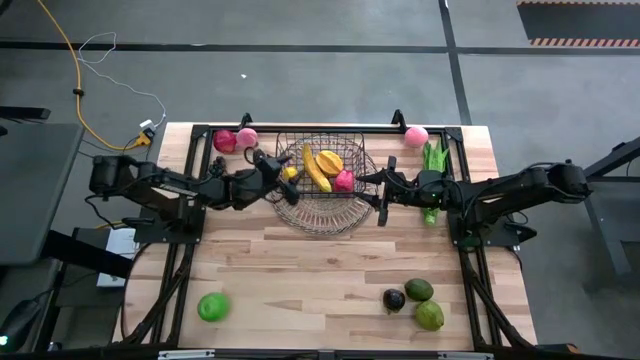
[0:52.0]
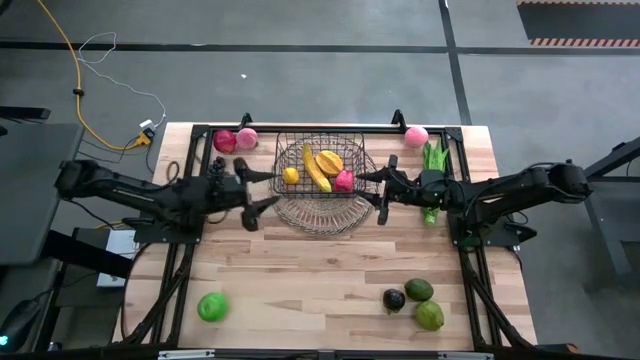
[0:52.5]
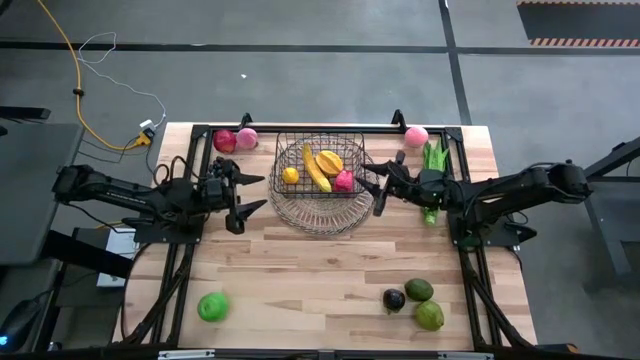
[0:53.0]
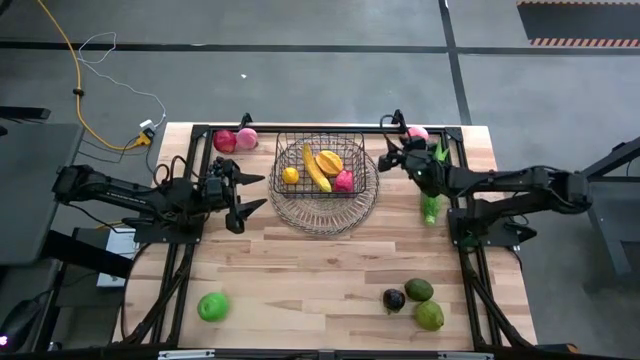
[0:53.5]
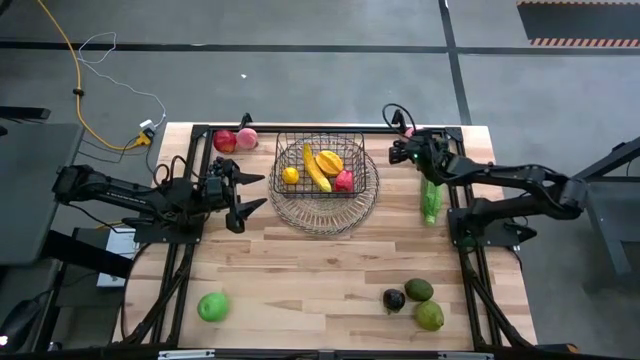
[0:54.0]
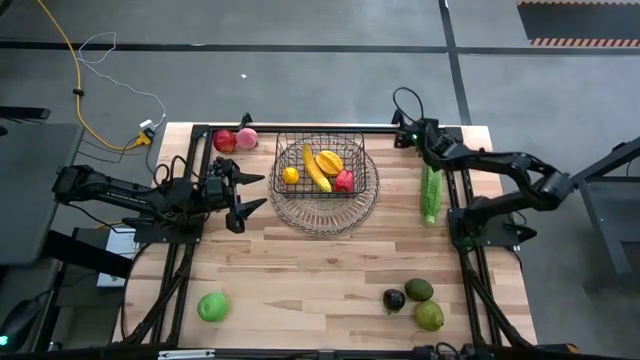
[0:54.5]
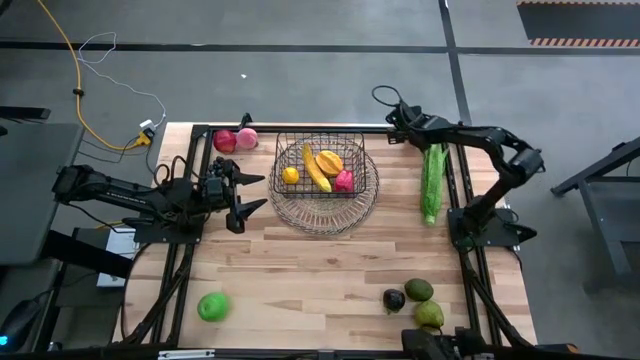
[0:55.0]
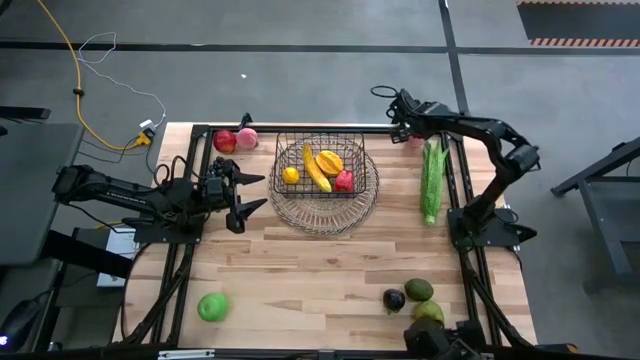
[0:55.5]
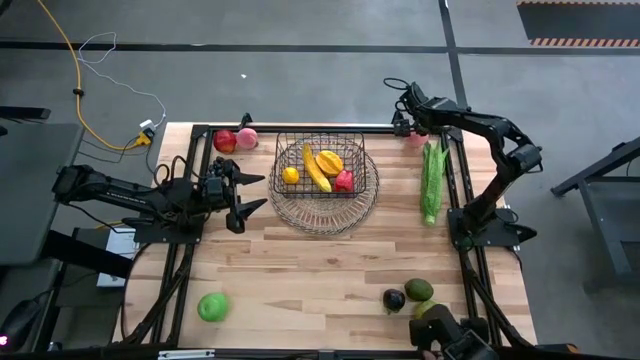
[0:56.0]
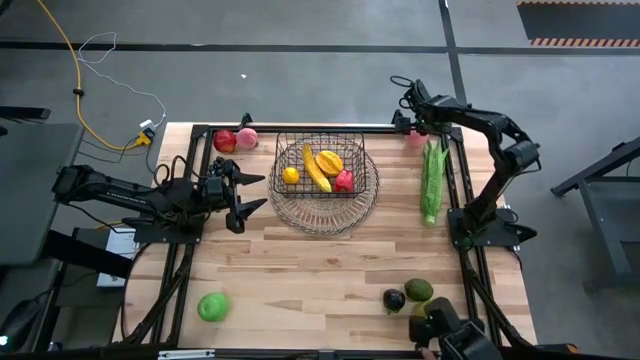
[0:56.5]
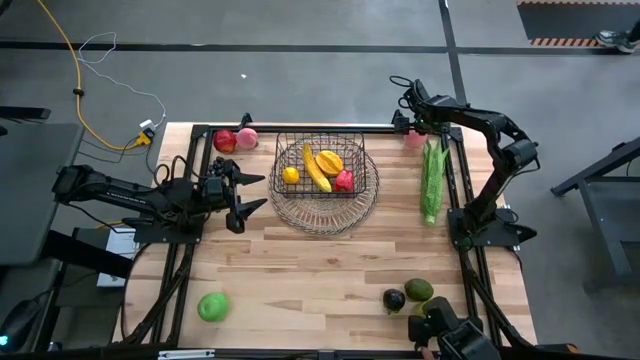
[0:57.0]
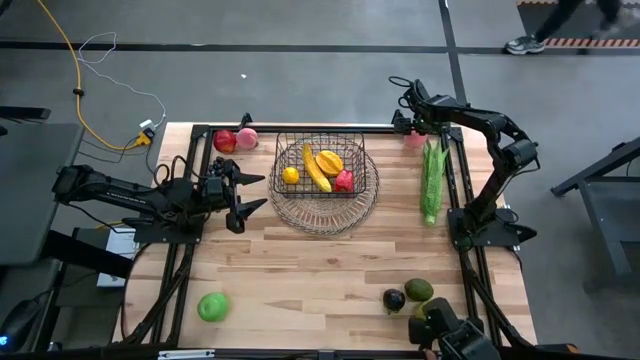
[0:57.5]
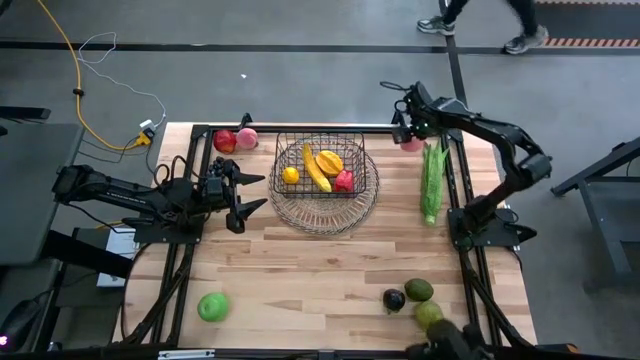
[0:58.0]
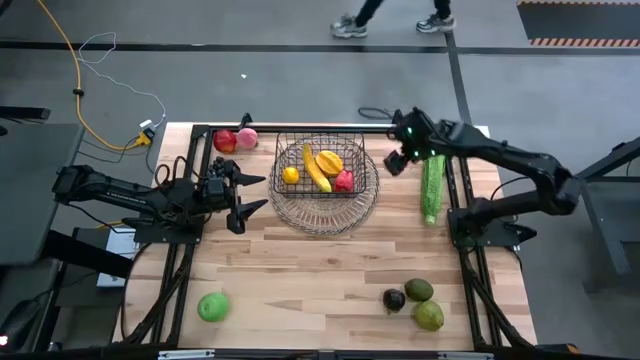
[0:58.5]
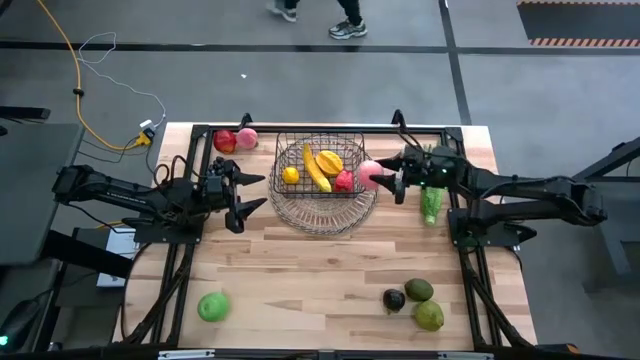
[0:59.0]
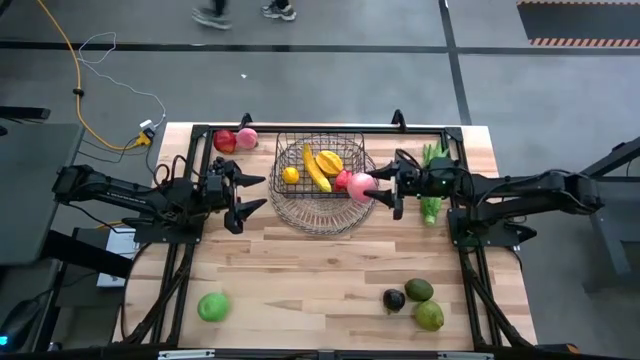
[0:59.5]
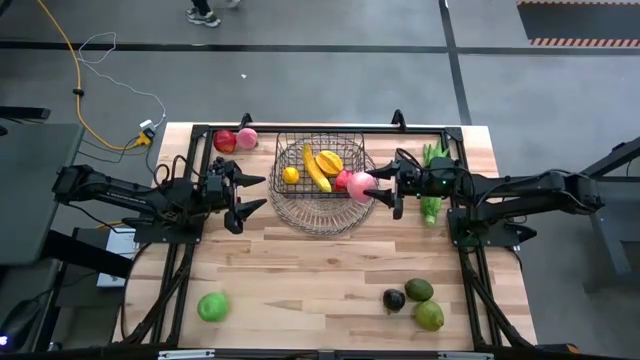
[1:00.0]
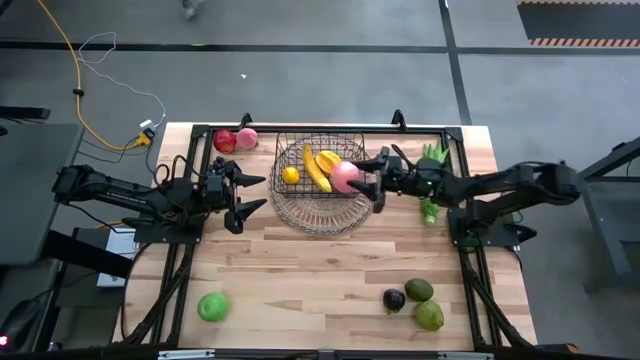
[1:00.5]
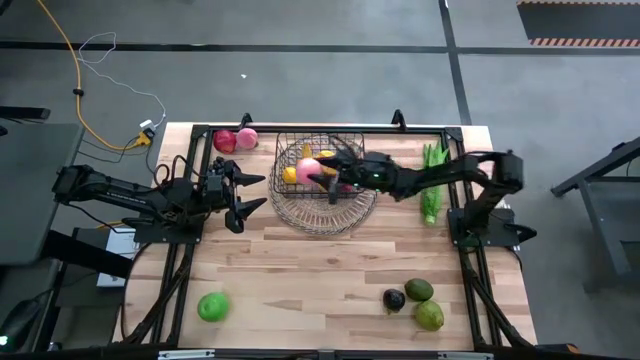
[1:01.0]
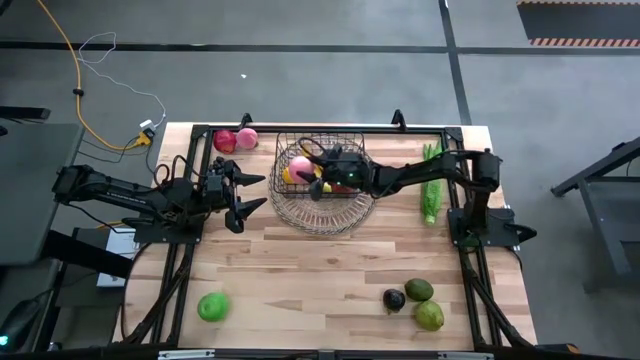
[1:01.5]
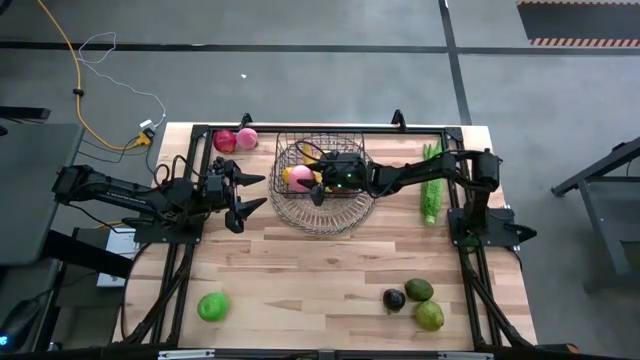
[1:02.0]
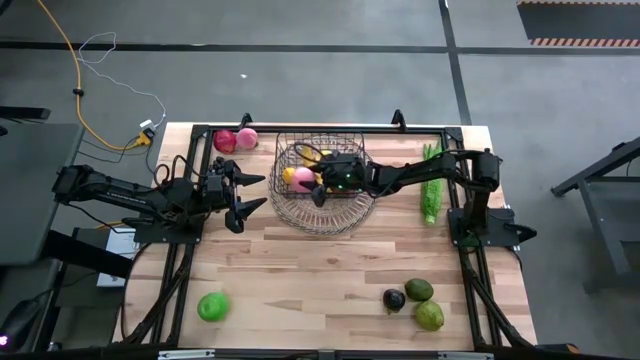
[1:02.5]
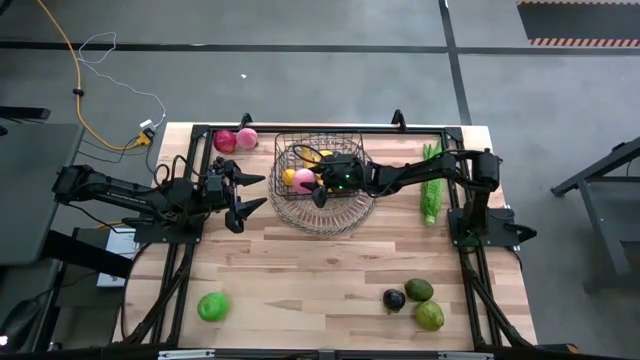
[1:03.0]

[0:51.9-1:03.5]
Task: Build produce basket
Put the right peach into the wire basket

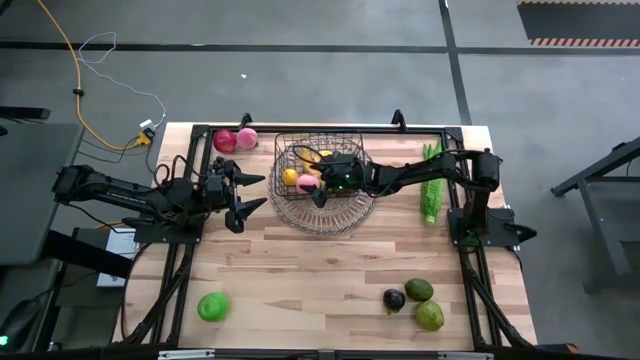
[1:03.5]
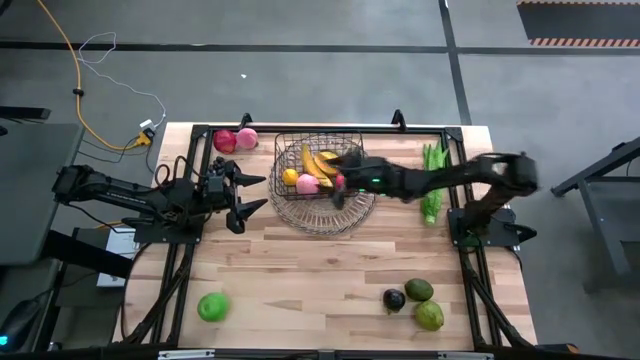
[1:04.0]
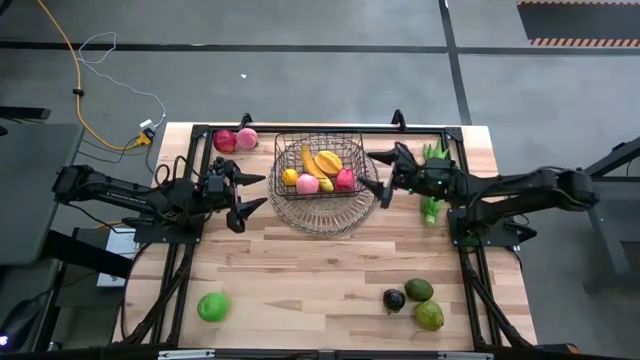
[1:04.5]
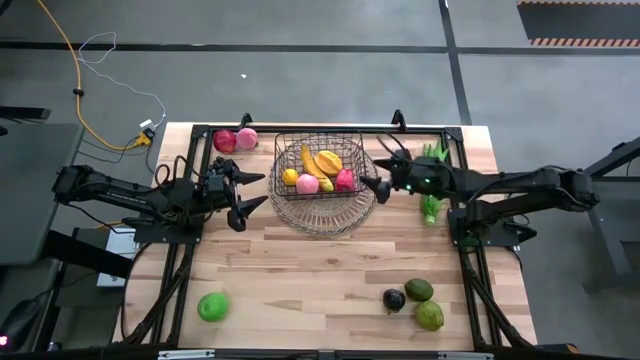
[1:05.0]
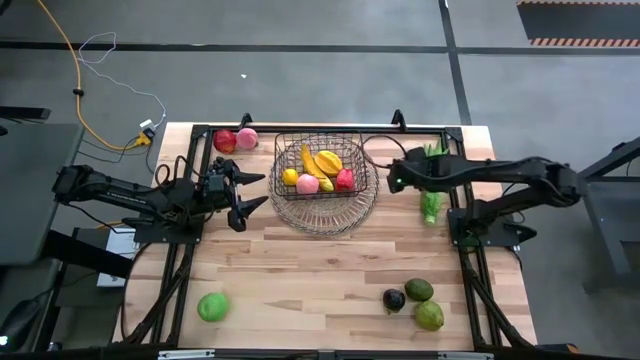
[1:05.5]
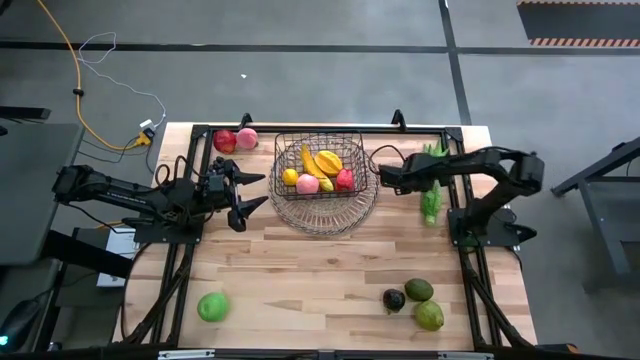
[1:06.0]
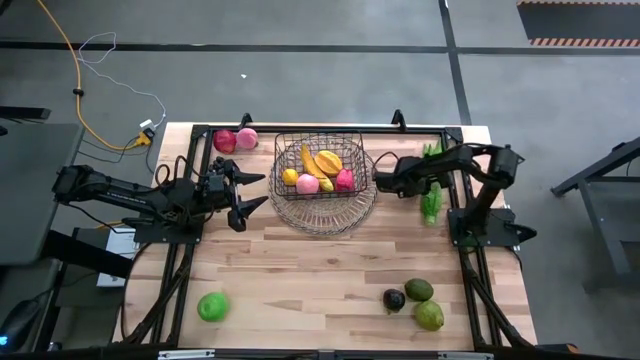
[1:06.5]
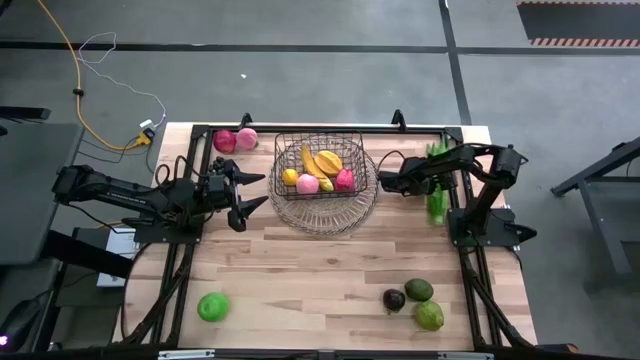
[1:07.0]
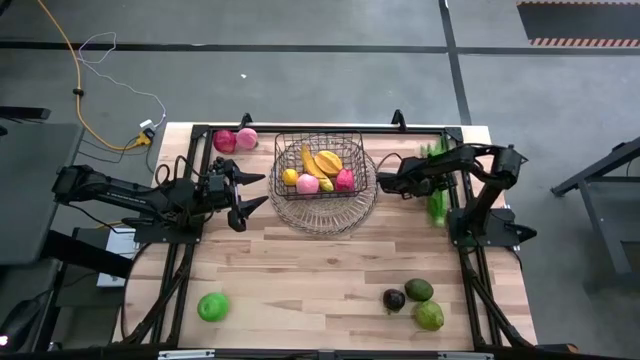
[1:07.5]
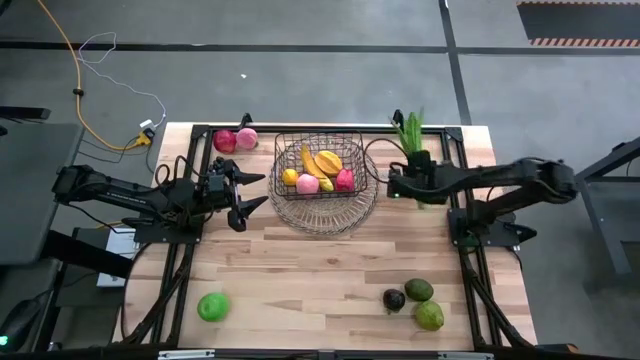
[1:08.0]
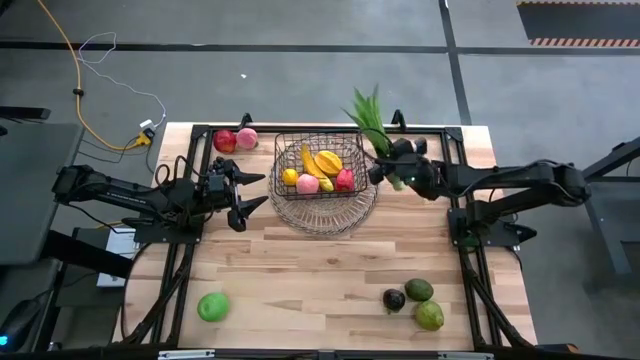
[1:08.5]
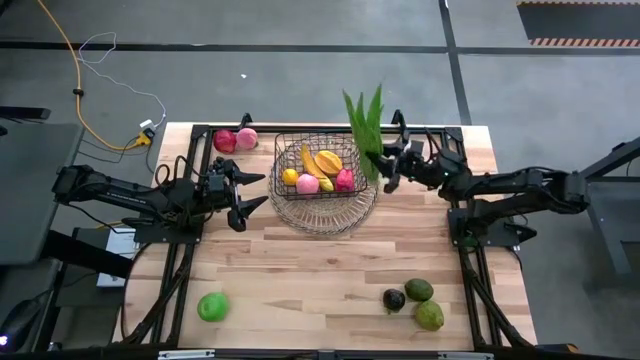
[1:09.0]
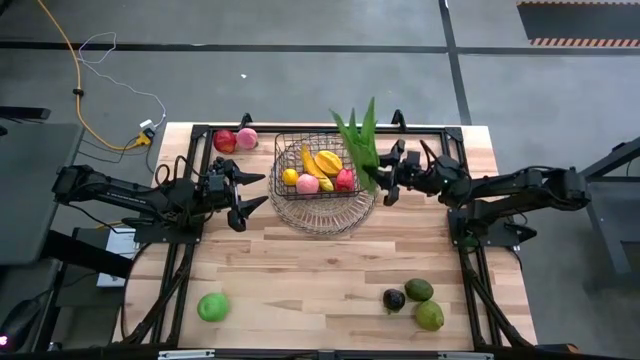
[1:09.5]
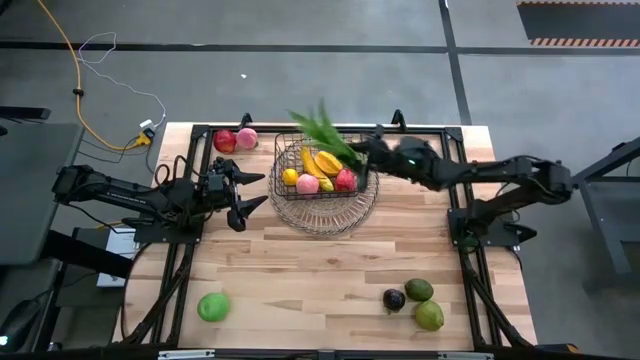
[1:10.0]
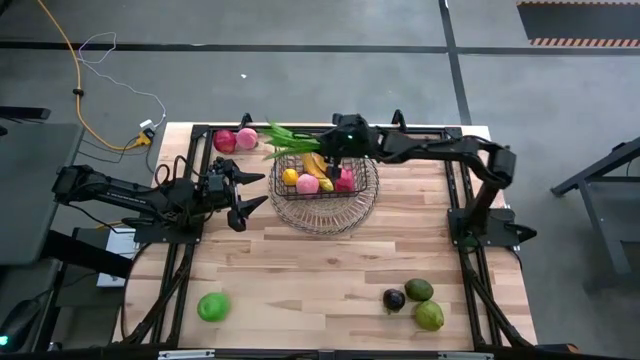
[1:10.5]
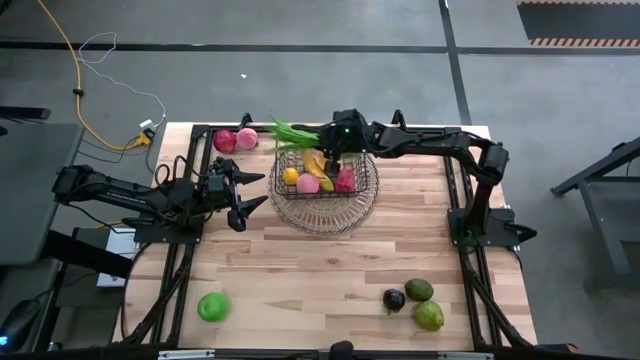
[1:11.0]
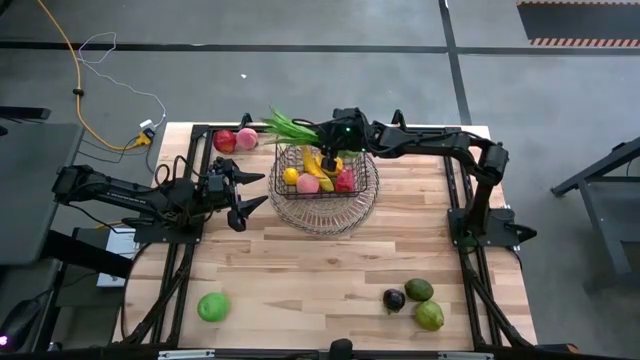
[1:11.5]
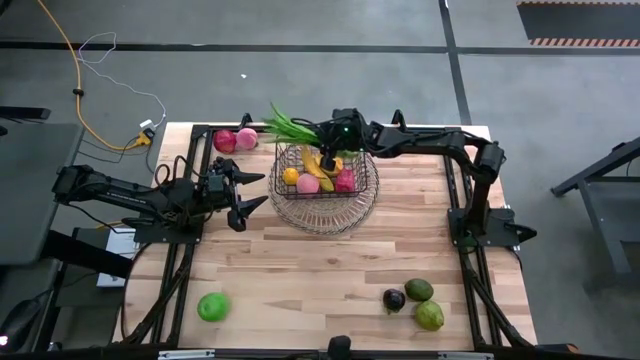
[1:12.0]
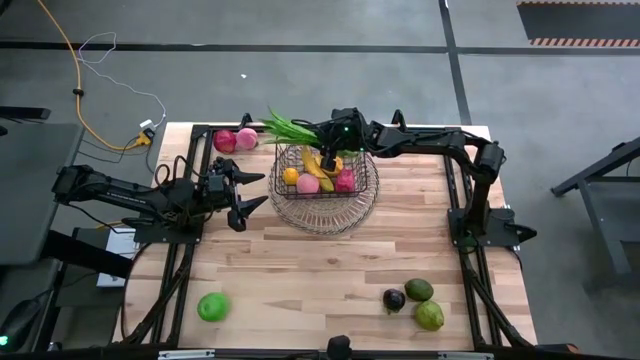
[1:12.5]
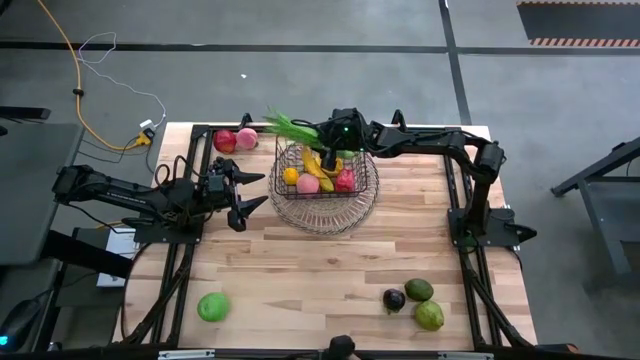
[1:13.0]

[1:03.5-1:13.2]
Put the leaf lettuce into the wire basket

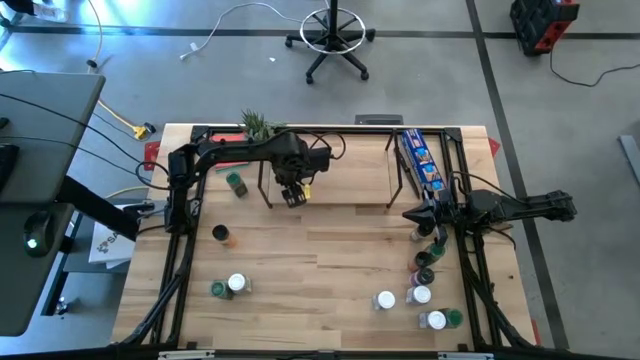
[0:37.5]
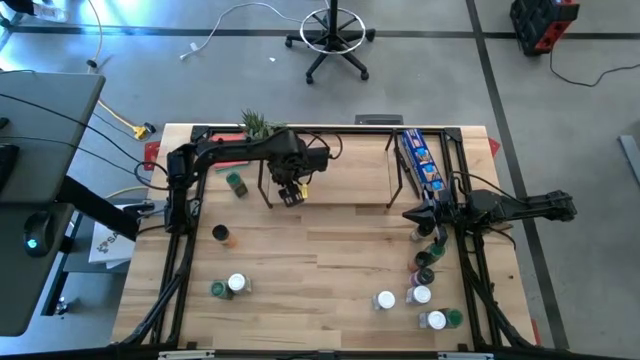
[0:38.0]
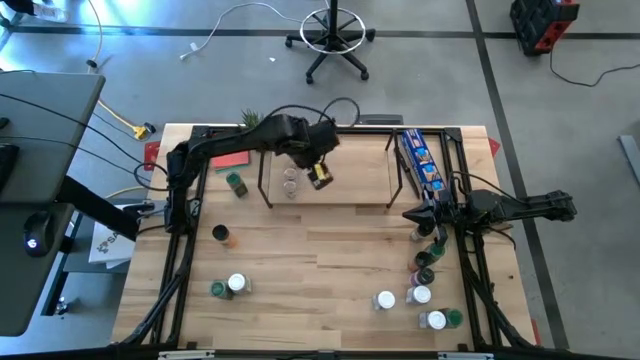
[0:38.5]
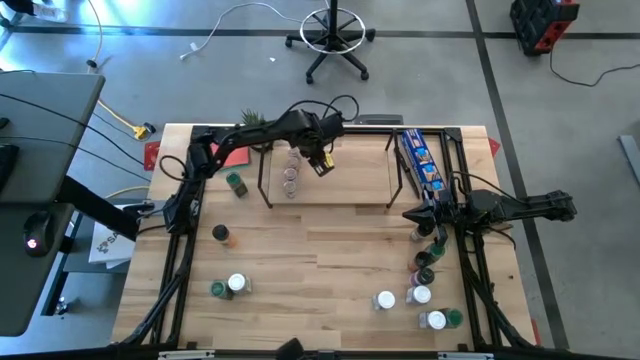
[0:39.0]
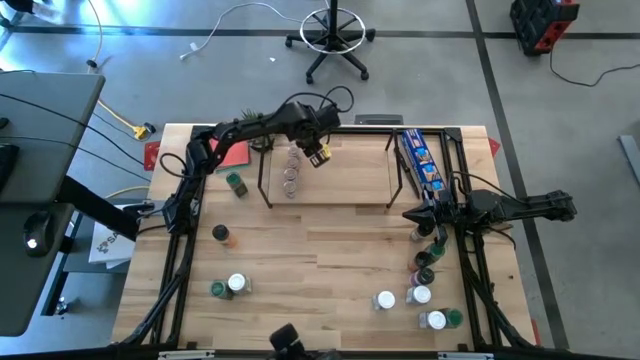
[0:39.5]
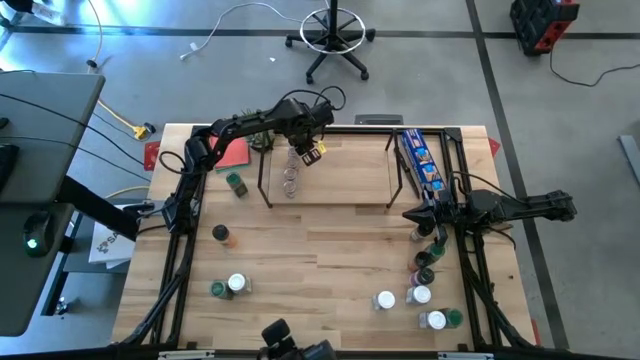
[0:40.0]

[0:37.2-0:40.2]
Task: Shelf spices
Adjust the brown seasoning bottle on the shelf
